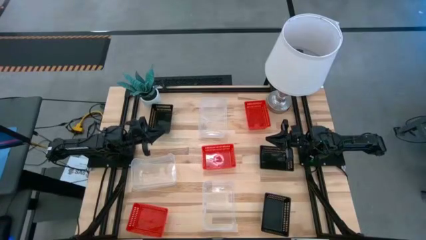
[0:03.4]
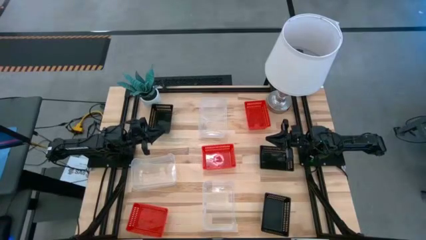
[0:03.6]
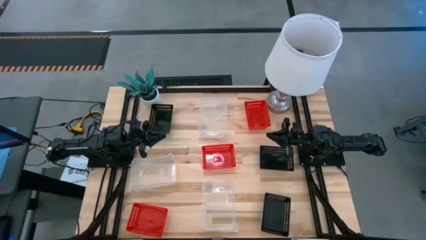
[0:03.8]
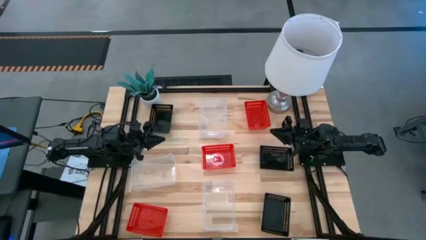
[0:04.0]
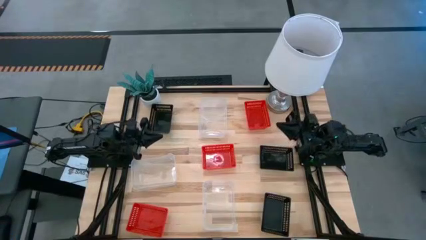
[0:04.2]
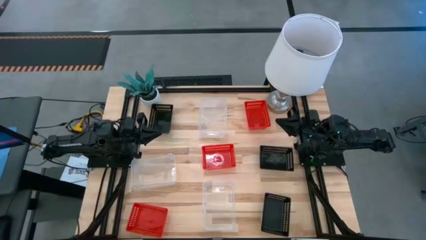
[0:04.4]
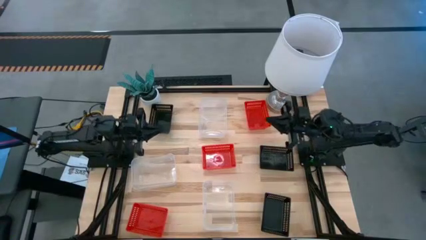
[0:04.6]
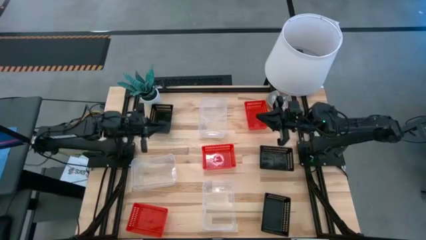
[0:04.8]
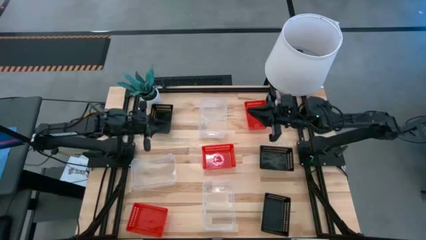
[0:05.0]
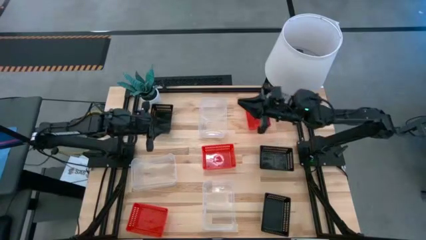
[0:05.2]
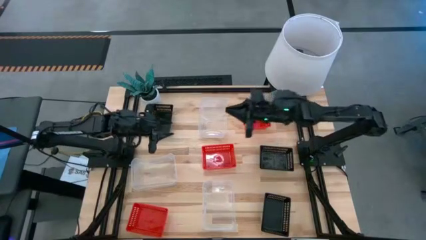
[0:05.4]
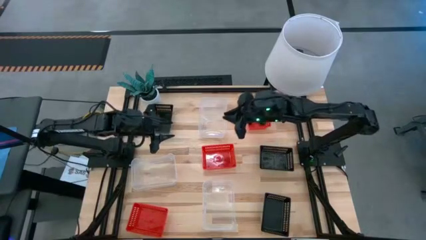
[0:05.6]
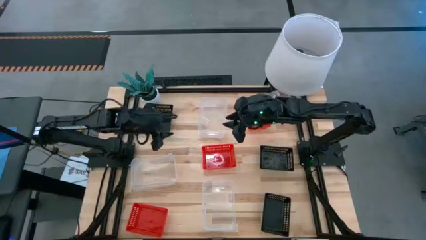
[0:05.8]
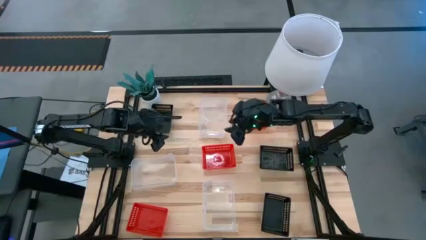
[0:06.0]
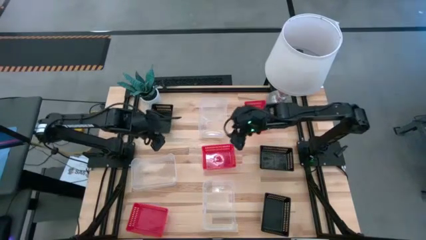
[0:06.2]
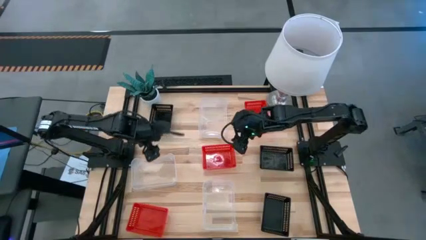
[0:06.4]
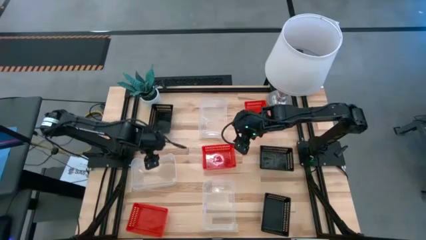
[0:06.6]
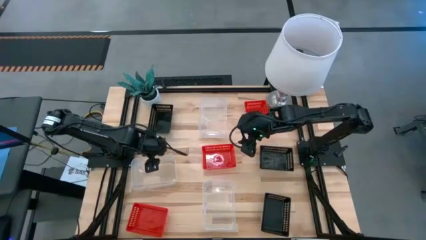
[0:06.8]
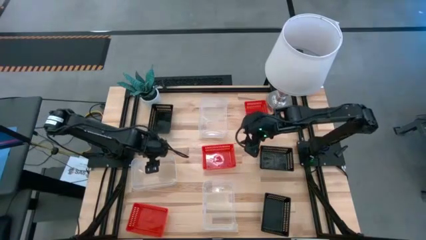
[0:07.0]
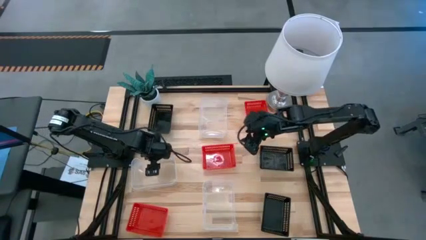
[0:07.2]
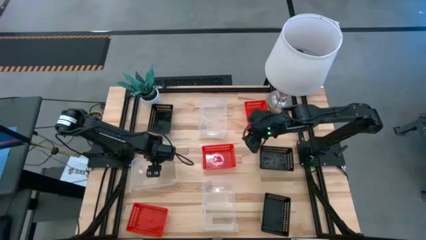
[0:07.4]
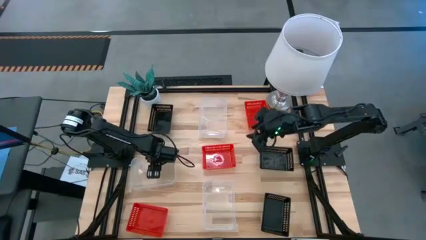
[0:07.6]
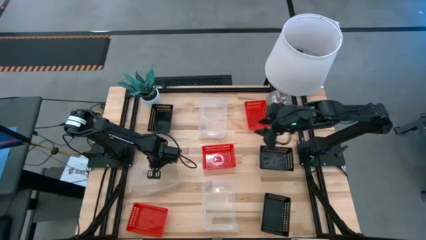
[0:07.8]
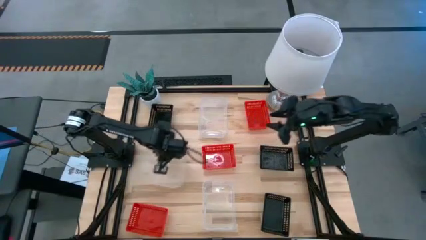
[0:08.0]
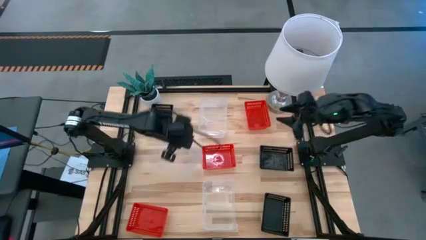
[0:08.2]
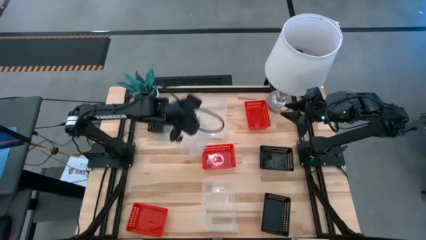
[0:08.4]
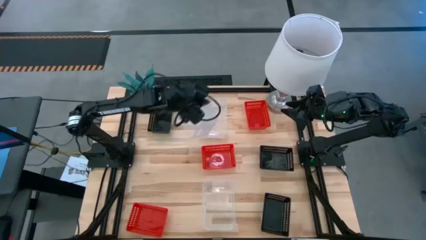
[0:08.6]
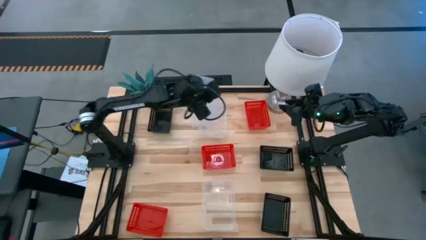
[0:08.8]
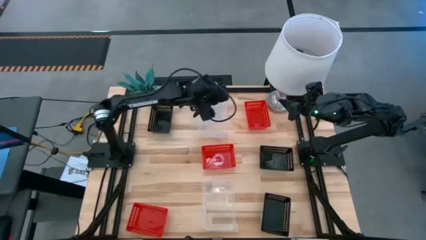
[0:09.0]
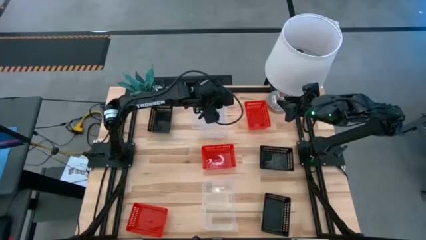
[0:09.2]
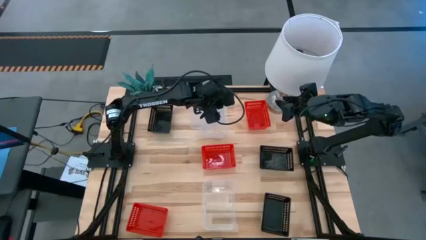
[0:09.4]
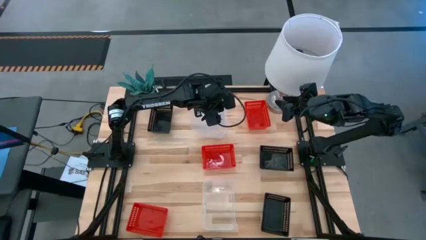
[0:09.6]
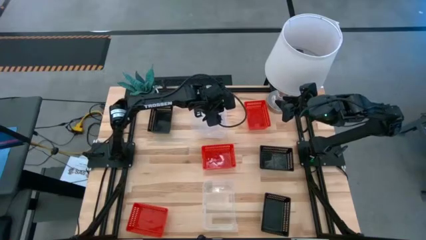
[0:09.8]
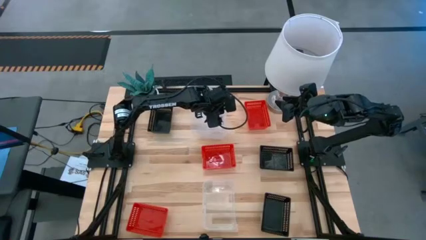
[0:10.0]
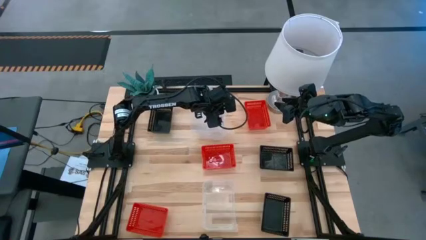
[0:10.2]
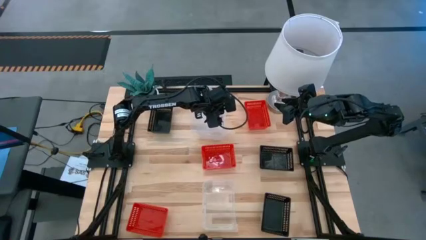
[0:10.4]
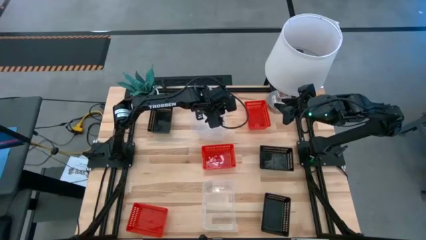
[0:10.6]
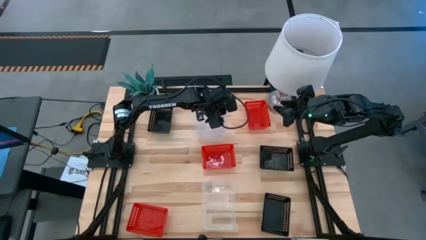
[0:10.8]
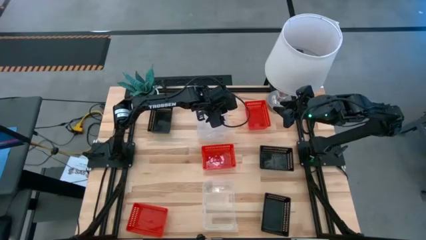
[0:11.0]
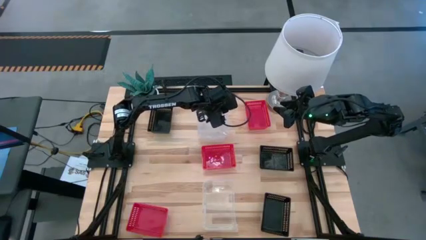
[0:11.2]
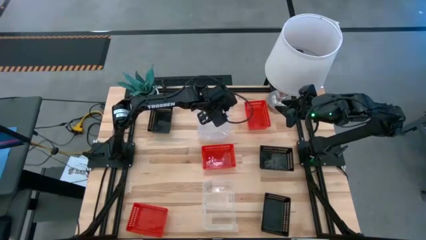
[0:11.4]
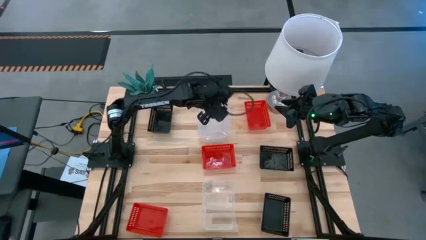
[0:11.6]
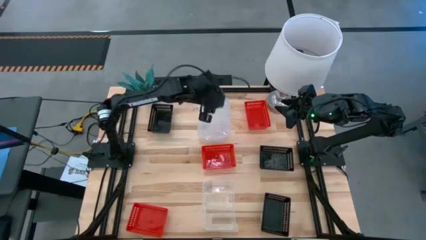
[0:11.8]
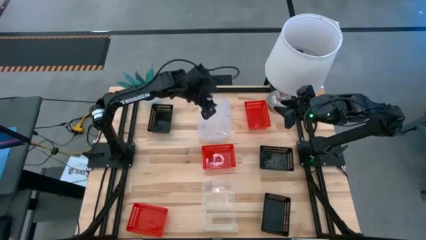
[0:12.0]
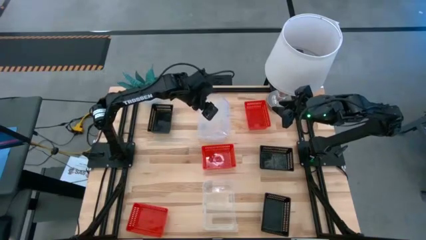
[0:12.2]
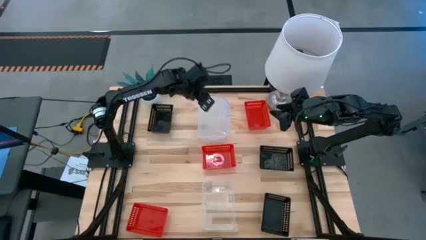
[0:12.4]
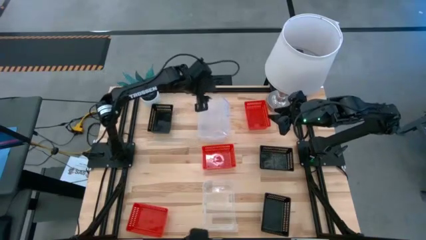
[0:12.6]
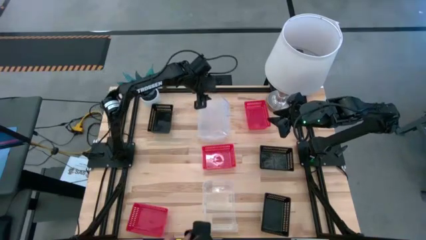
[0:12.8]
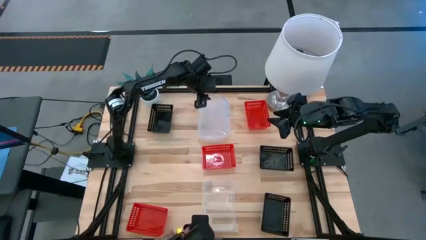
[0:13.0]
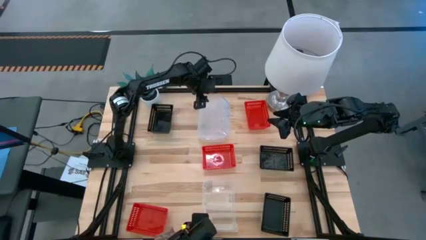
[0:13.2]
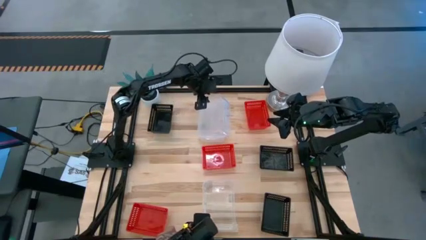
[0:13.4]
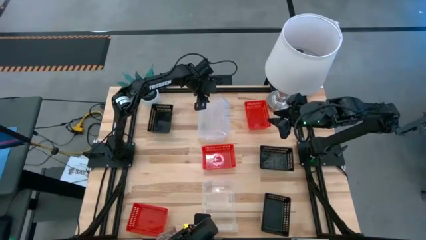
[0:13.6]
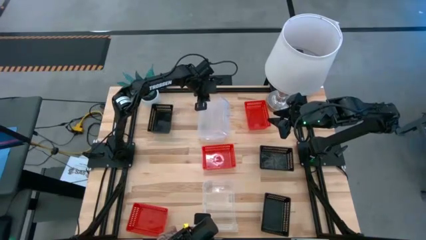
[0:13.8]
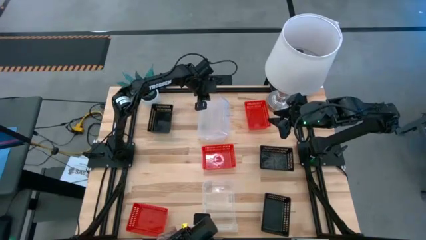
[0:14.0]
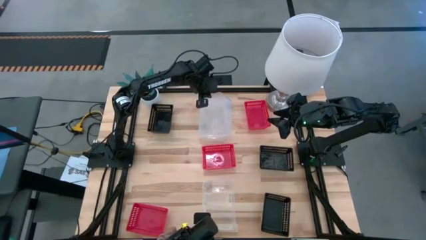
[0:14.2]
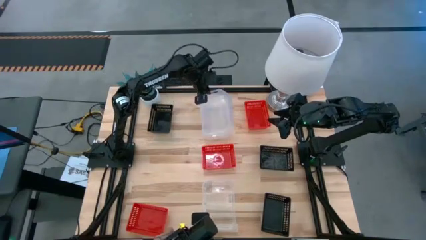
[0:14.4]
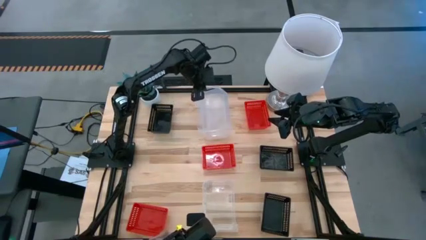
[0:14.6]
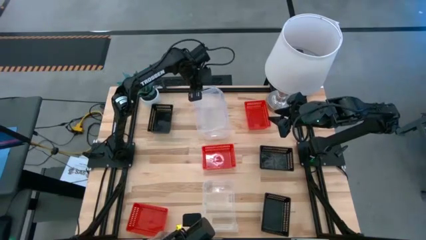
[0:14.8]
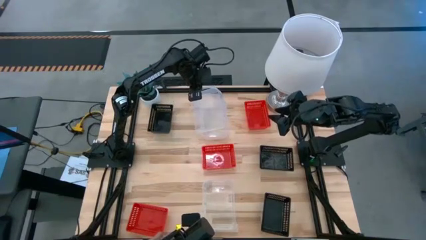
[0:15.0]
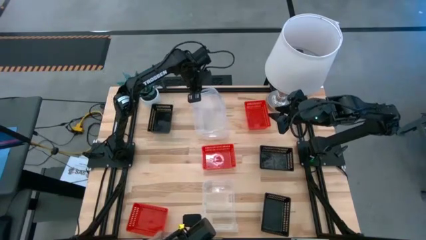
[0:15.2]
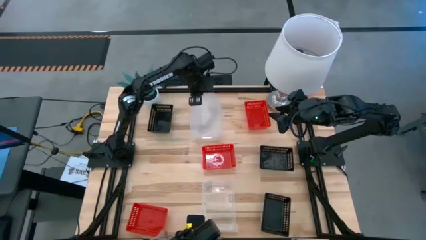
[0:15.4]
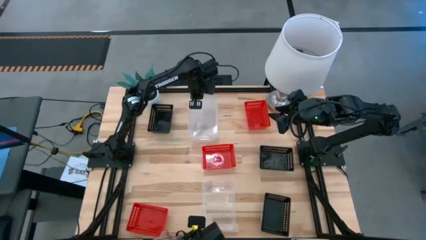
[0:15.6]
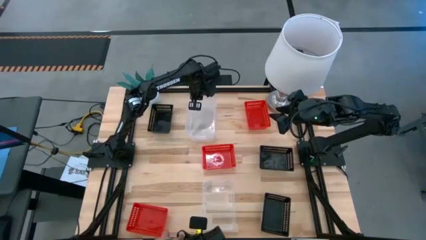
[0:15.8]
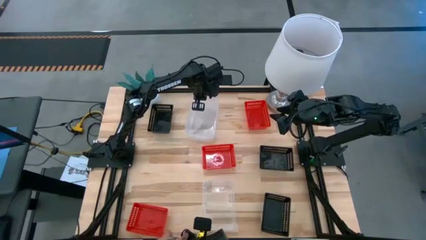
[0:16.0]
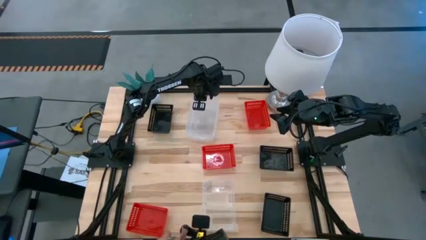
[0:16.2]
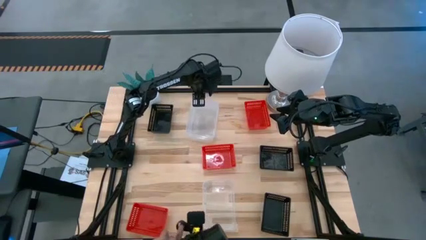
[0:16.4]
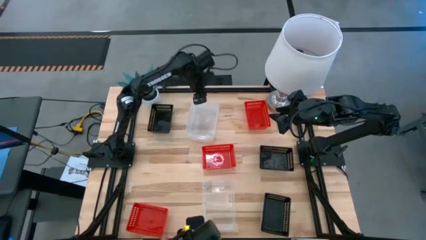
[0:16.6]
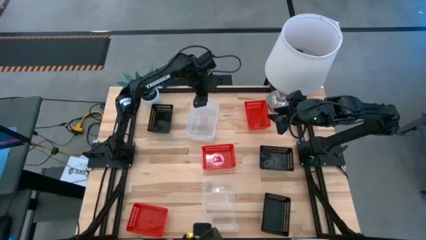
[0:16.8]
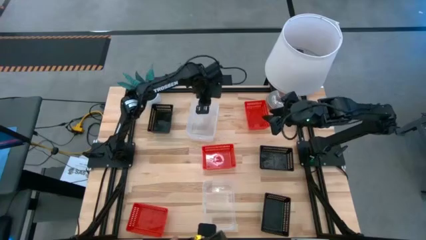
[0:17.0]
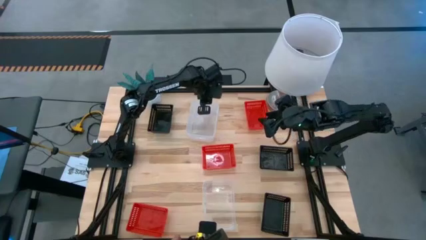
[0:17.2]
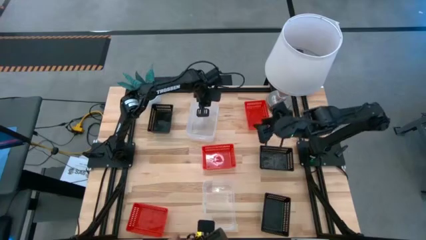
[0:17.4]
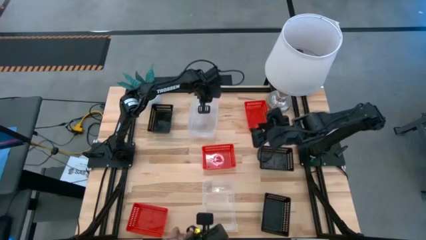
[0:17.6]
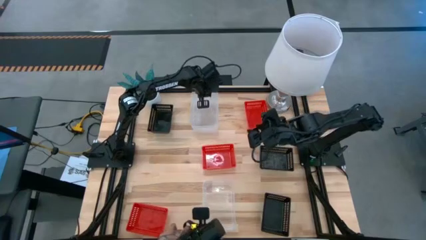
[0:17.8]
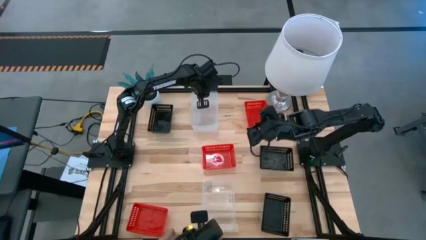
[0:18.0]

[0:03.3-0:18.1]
Stack the middle left transparent bin on the top transparent bin
